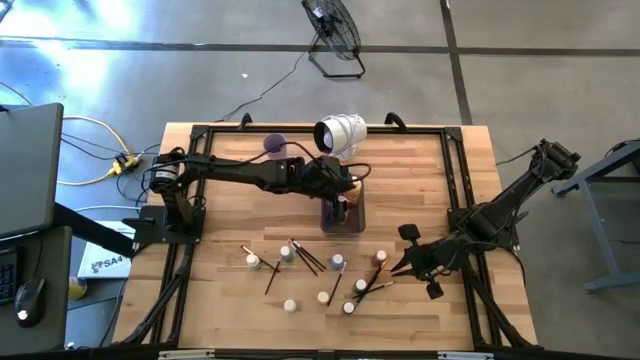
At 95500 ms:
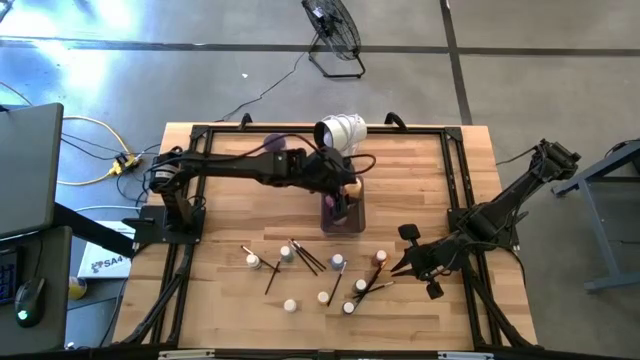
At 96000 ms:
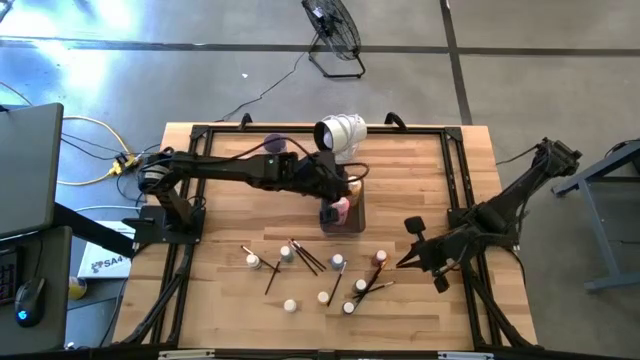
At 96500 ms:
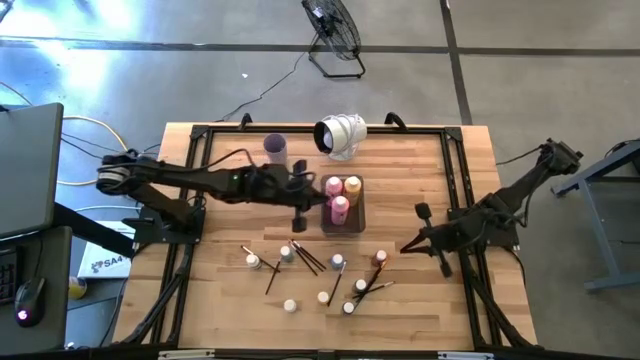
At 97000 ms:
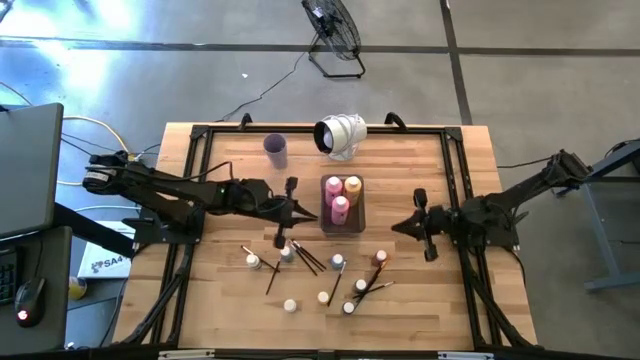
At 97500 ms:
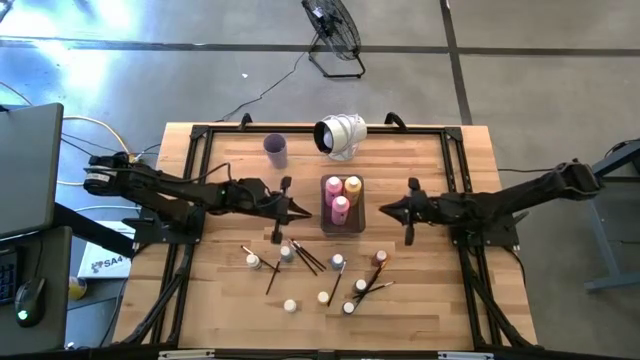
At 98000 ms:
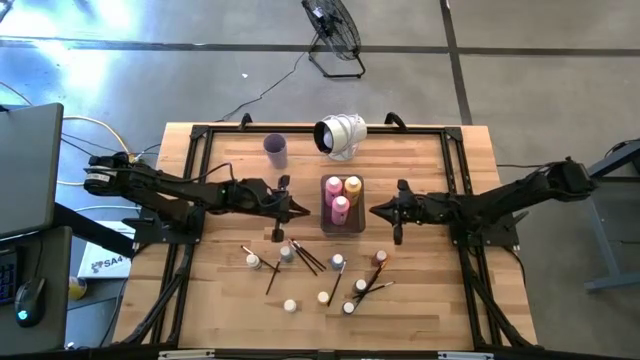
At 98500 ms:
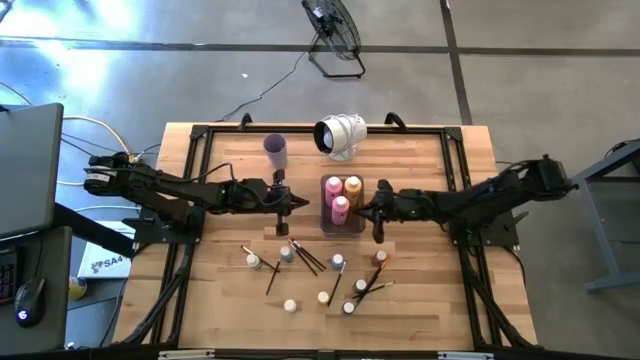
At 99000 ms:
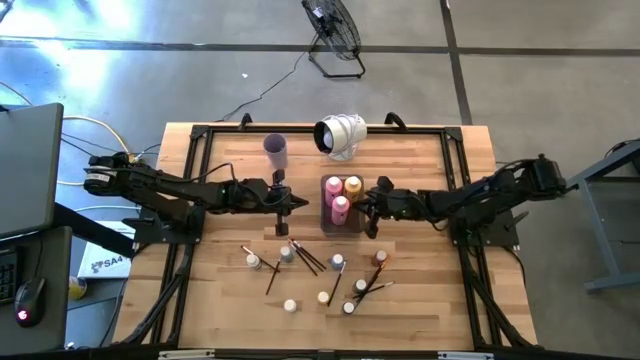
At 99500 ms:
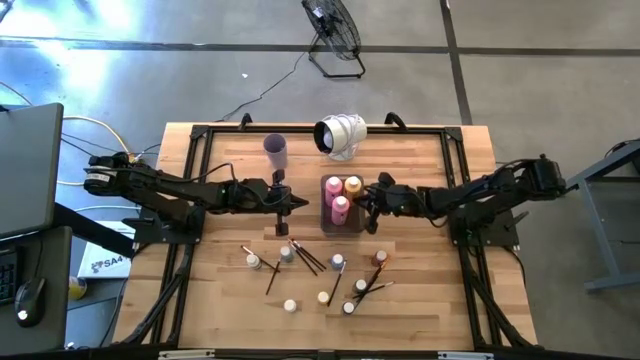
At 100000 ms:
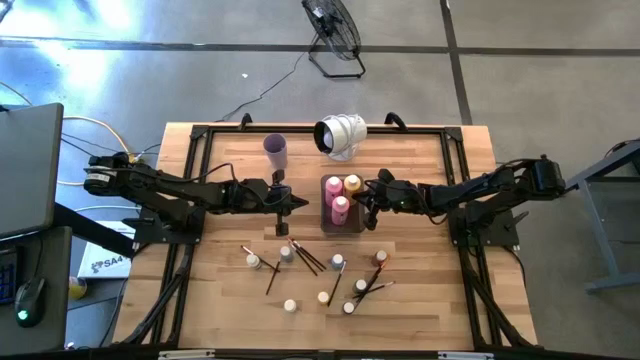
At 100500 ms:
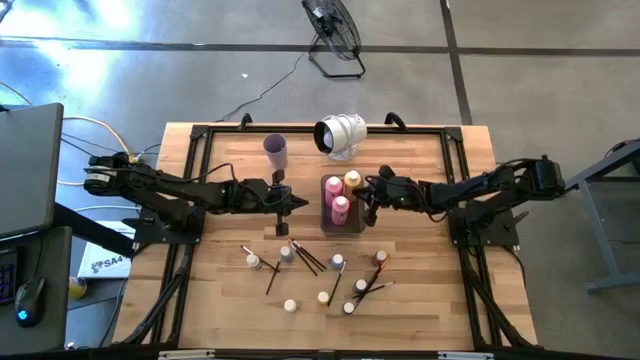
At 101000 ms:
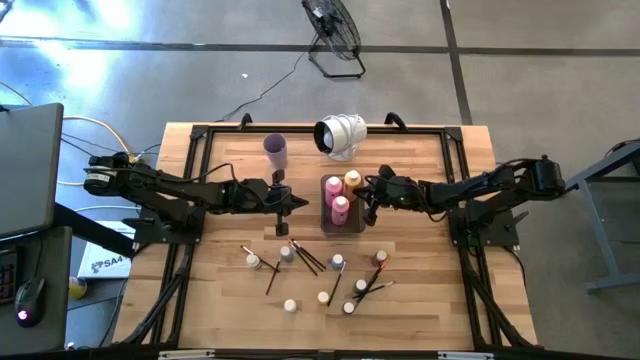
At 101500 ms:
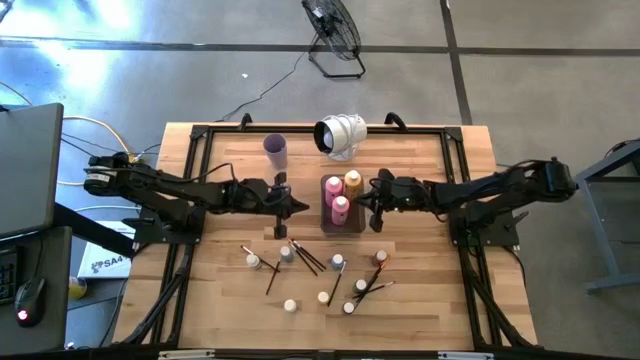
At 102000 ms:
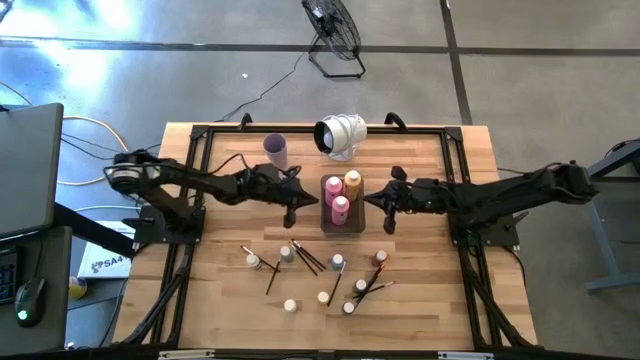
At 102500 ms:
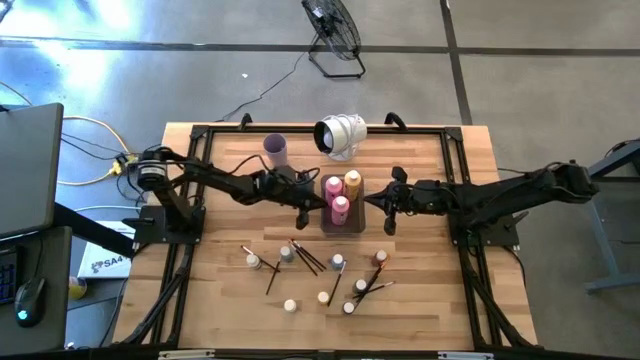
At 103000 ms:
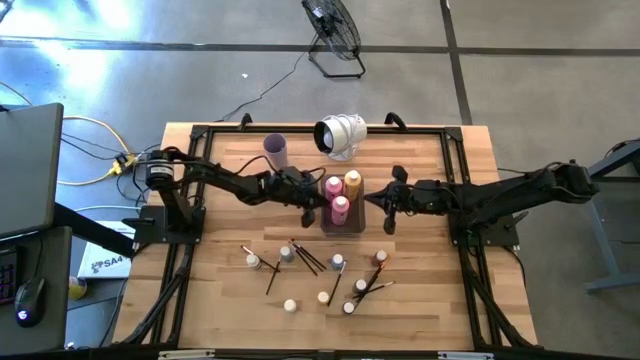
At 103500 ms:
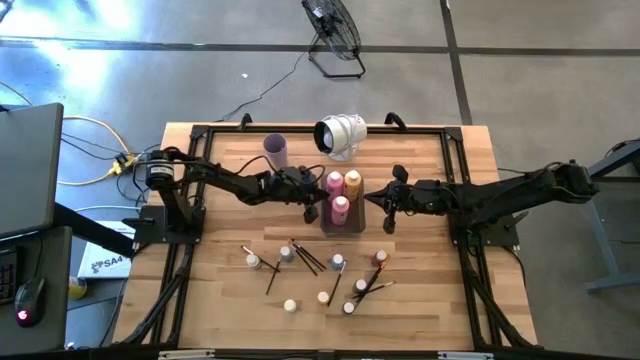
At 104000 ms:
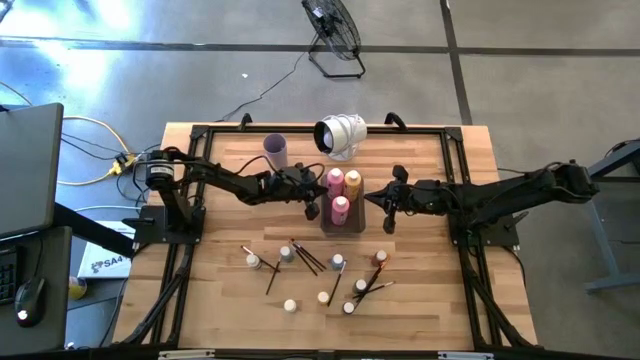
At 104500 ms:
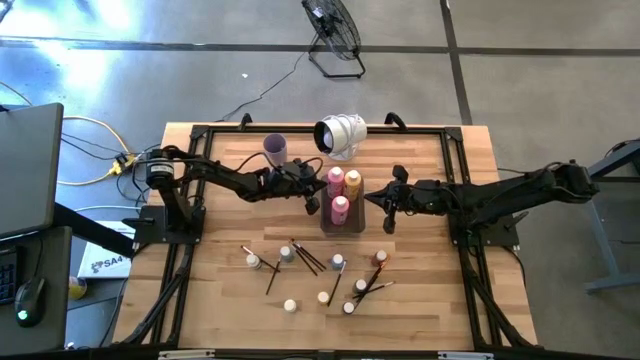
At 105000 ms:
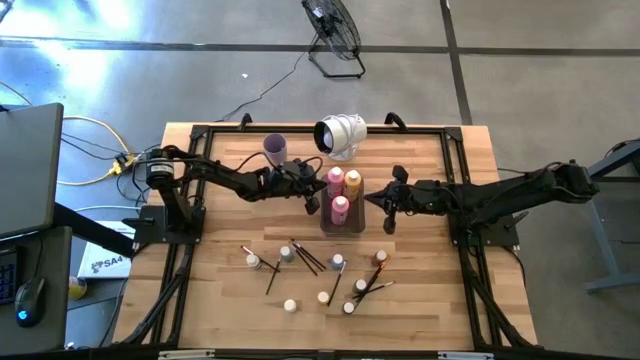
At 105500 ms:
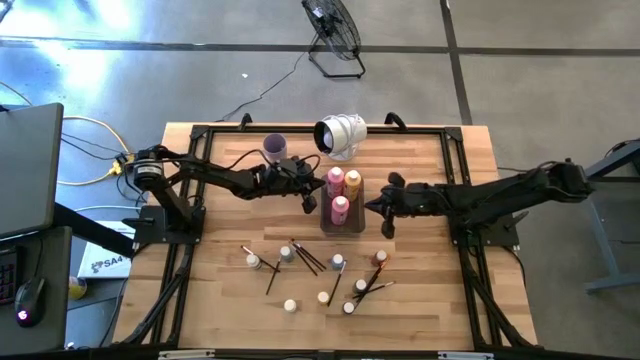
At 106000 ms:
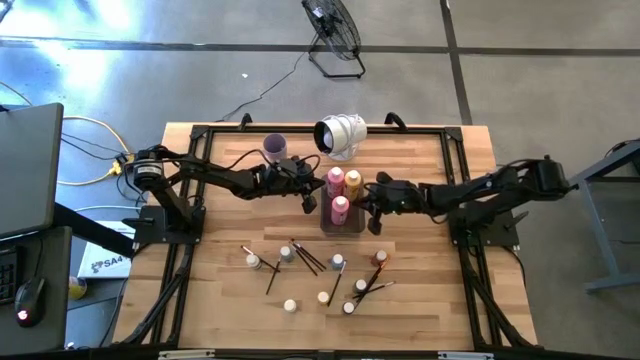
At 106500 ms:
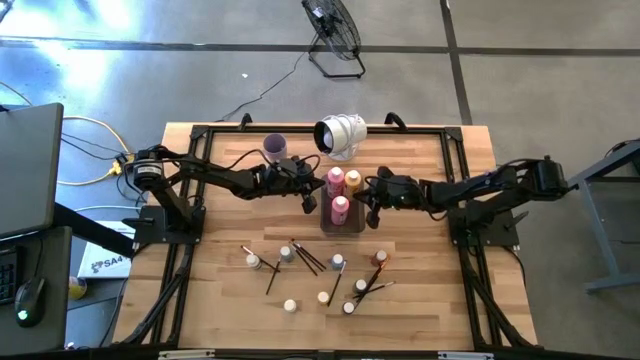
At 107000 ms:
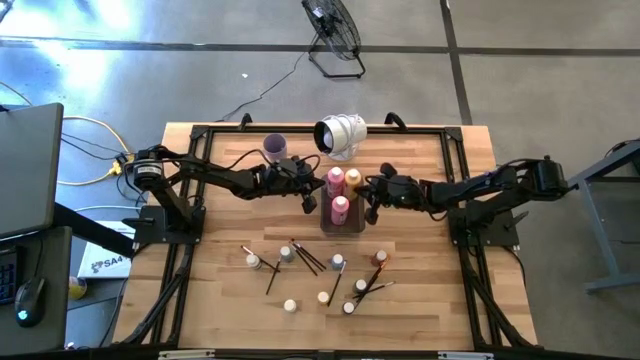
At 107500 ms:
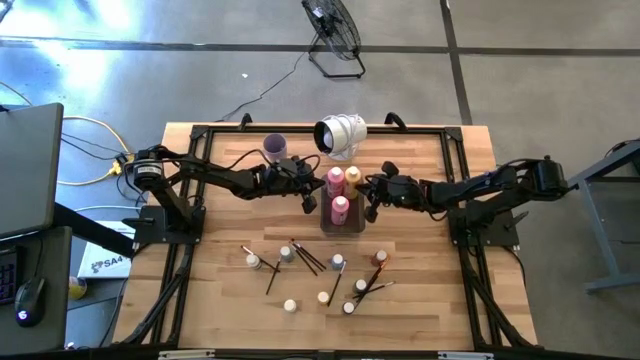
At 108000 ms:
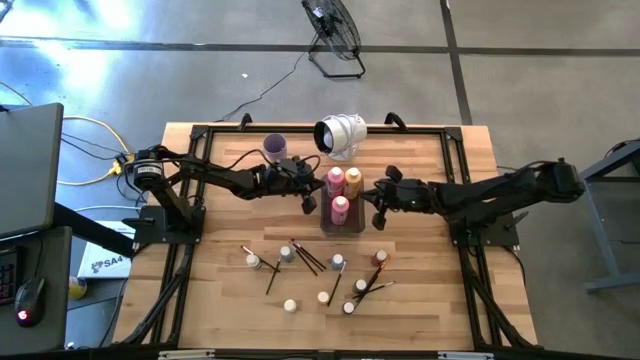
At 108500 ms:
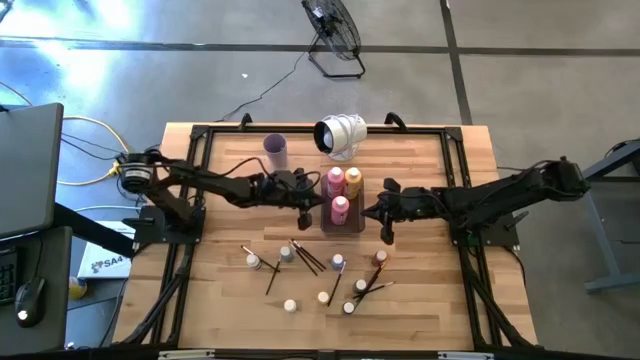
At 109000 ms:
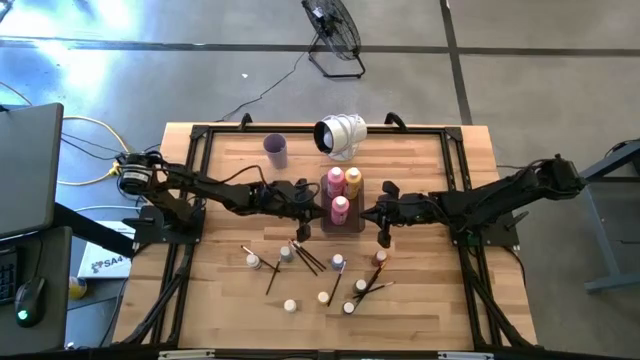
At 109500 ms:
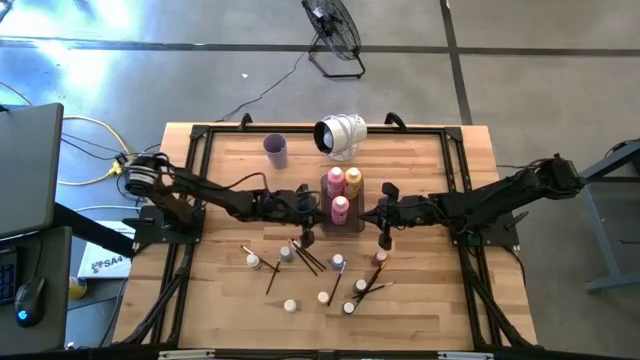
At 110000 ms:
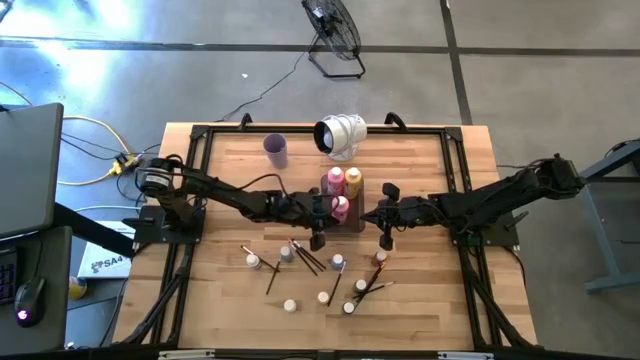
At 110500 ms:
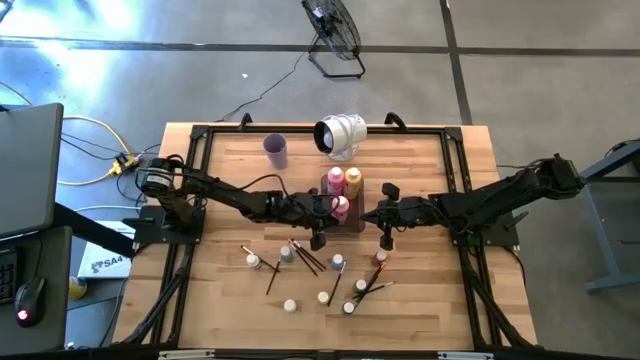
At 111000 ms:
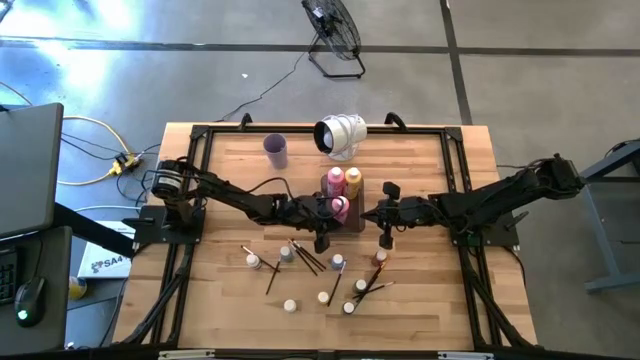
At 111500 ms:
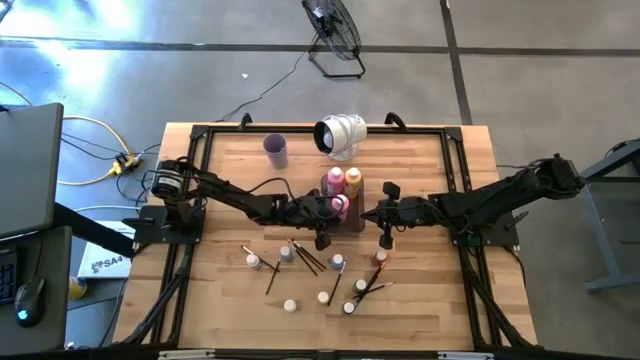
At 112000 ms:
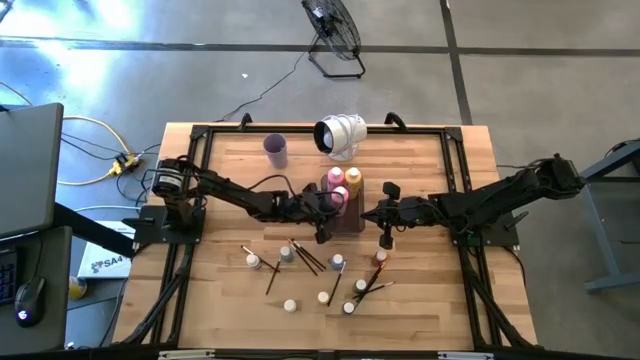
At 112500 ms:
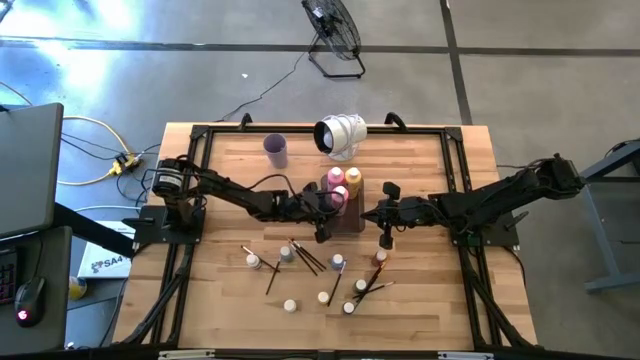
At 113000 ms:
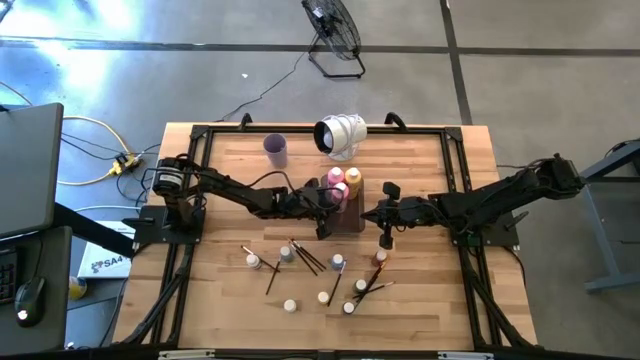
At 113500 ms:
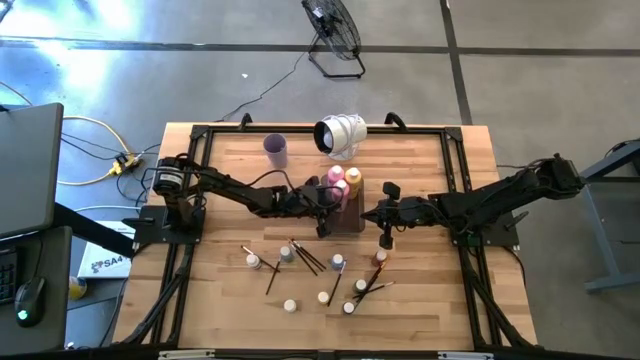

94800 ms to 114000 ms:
Task: Pick & Place Paint Supplies
Adjust the paint bottles

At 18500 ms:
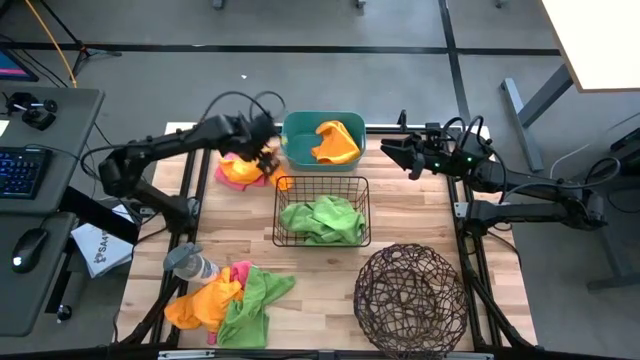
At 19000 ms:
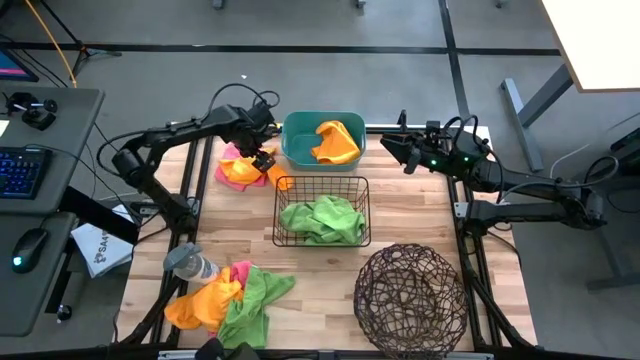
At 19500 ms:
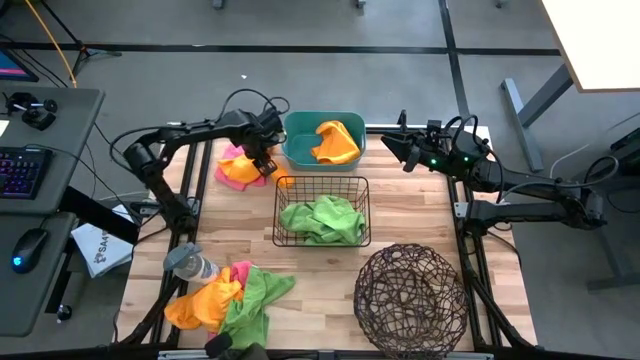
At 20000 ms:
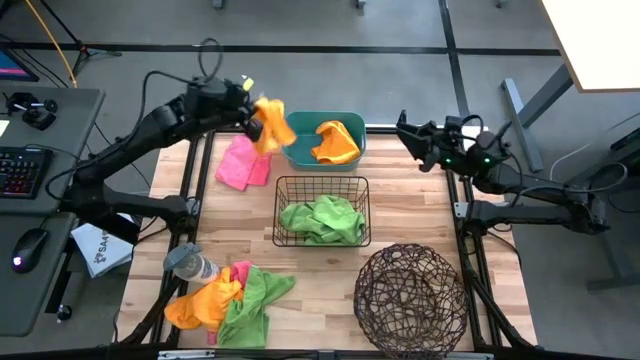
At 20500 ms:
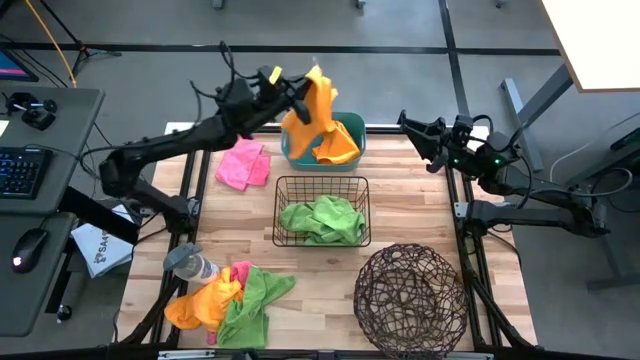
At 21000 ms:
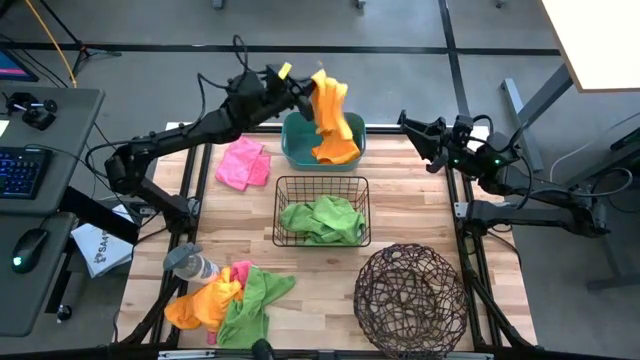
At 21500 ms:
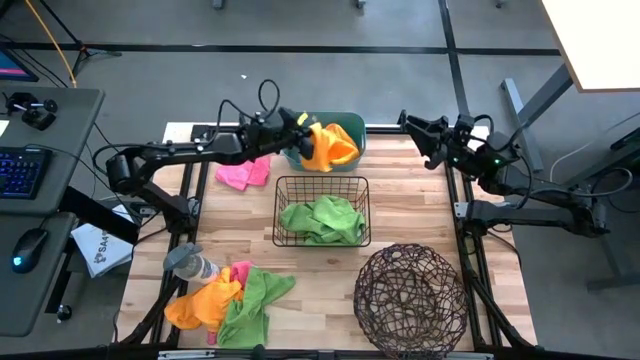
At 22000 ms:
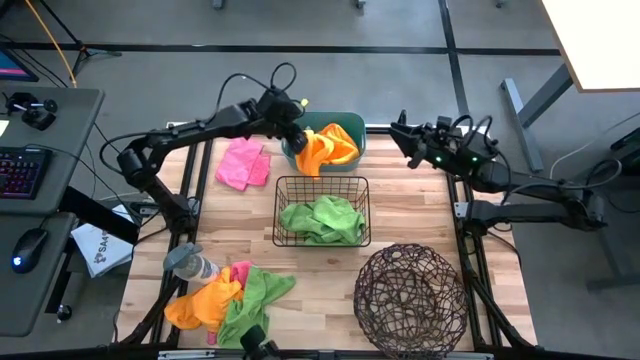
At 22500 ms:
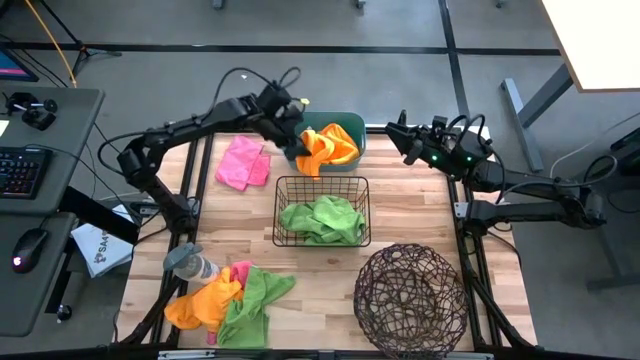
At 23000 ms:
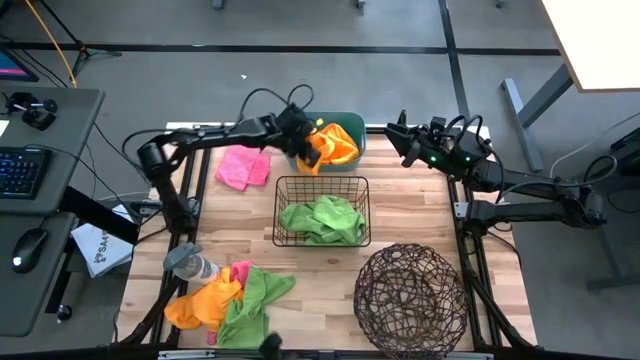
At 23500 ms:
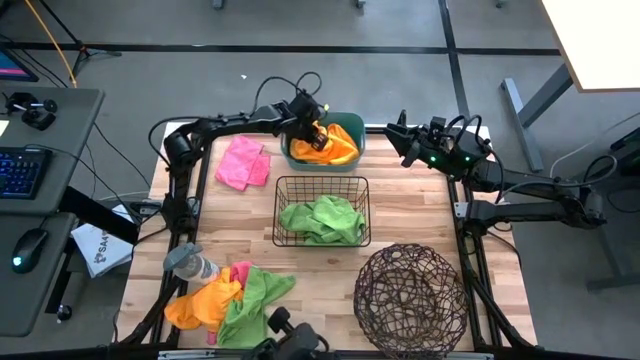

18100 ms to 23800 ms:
Task: Sort microfiber towel by color & place in baskets
Put the top orange microfiber cloth into the blue and green bin
